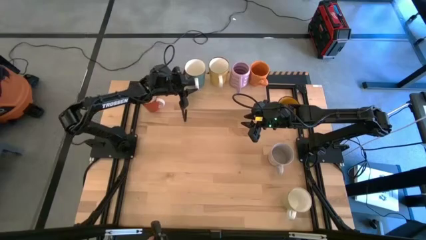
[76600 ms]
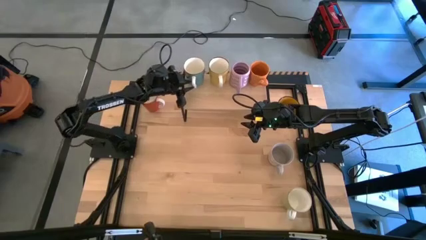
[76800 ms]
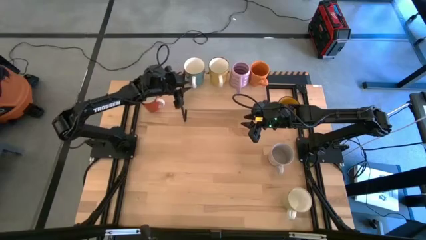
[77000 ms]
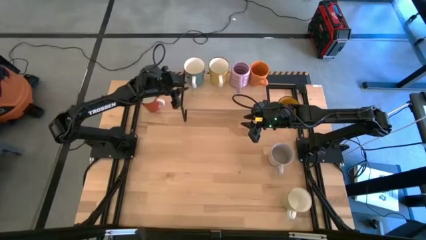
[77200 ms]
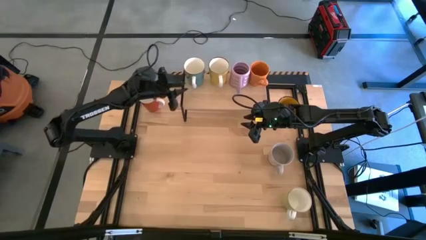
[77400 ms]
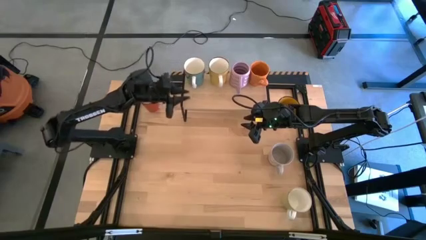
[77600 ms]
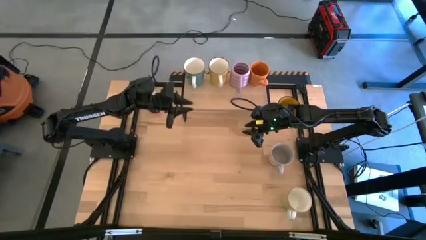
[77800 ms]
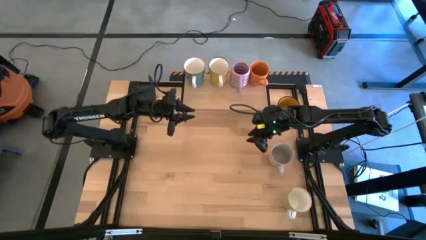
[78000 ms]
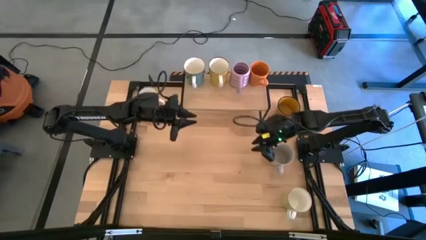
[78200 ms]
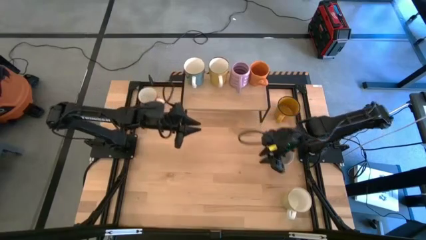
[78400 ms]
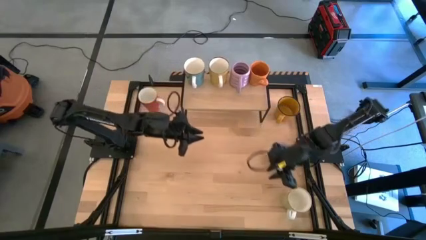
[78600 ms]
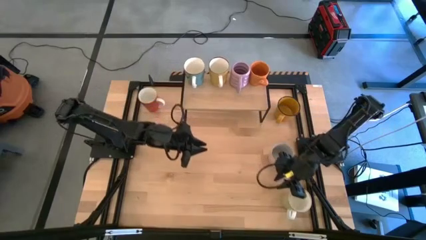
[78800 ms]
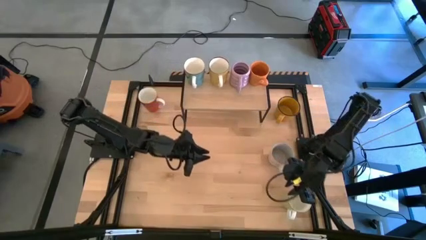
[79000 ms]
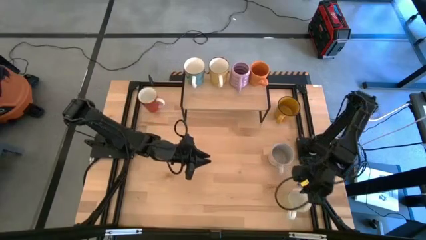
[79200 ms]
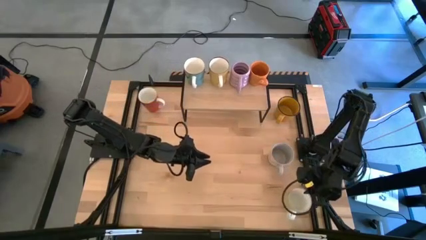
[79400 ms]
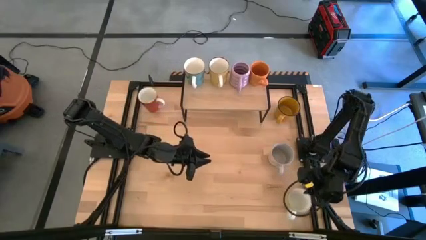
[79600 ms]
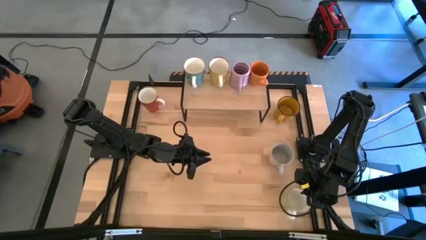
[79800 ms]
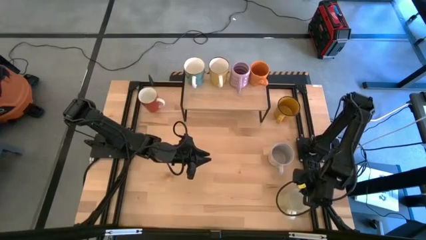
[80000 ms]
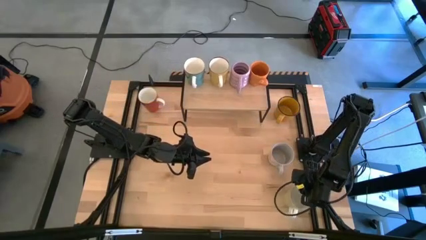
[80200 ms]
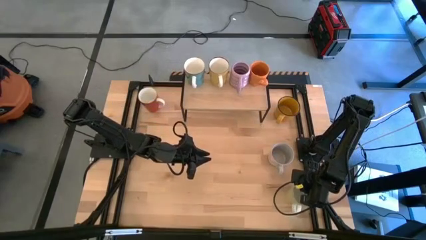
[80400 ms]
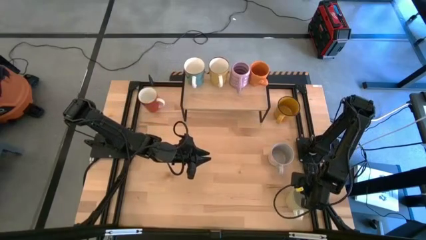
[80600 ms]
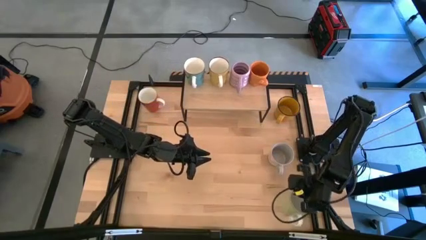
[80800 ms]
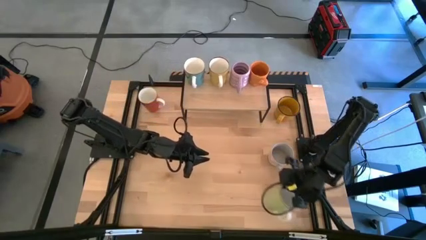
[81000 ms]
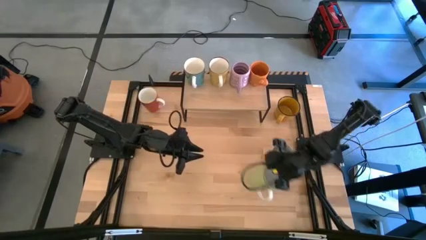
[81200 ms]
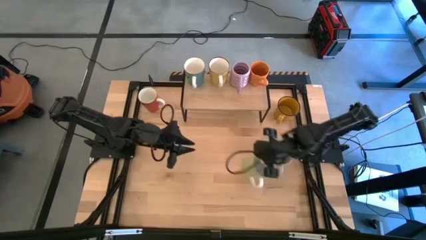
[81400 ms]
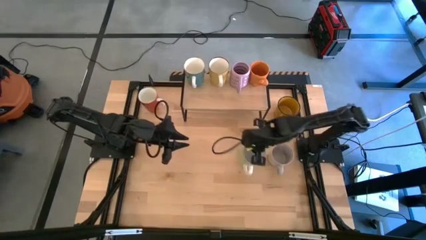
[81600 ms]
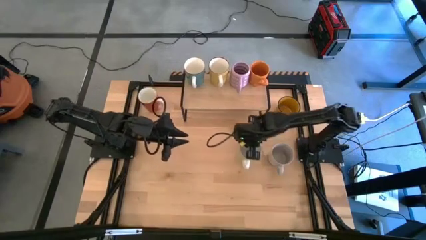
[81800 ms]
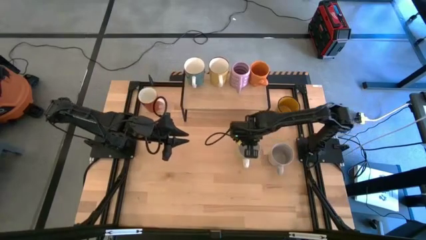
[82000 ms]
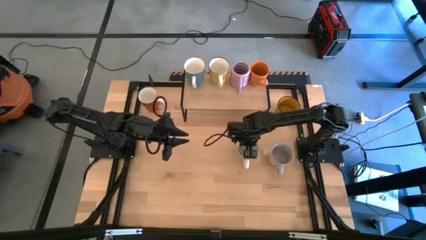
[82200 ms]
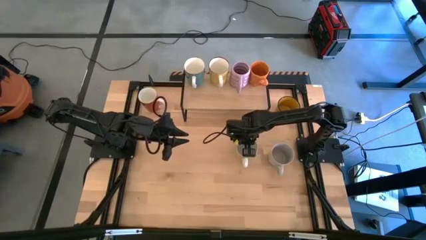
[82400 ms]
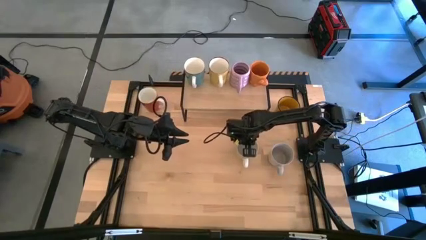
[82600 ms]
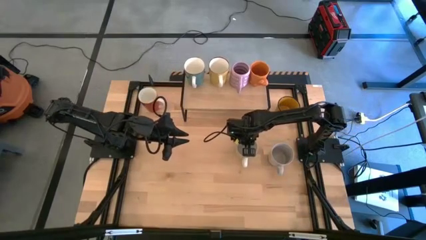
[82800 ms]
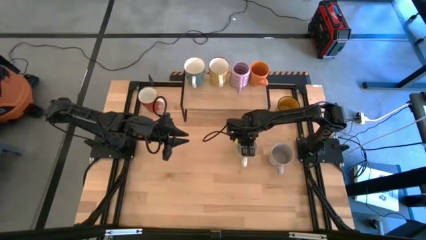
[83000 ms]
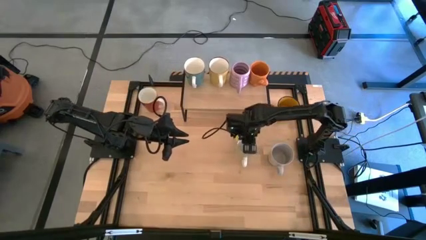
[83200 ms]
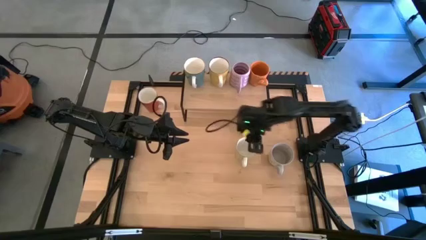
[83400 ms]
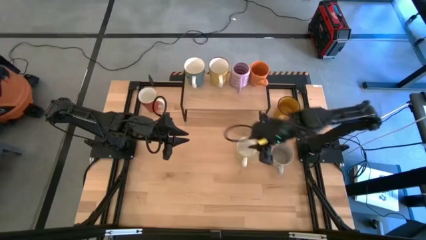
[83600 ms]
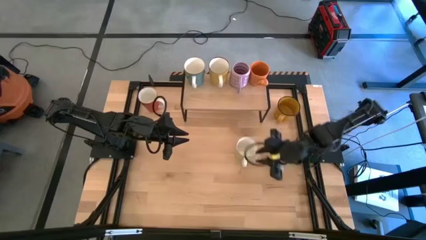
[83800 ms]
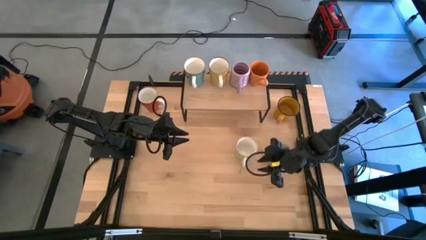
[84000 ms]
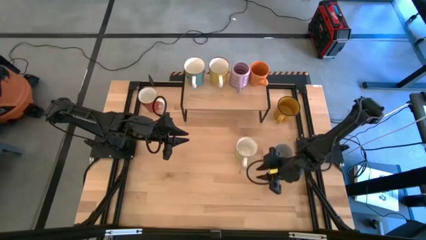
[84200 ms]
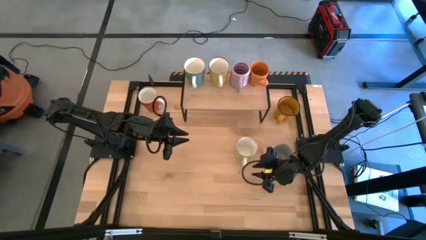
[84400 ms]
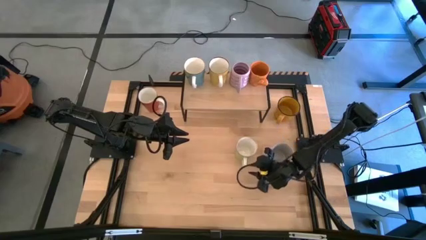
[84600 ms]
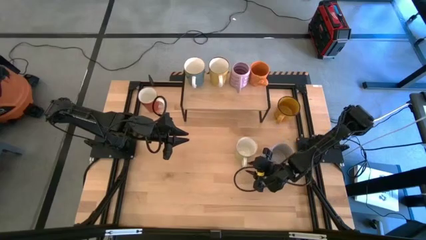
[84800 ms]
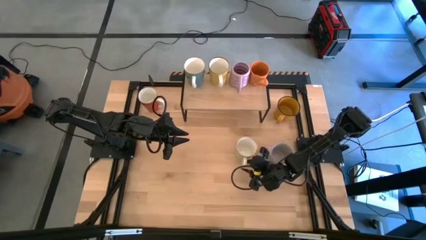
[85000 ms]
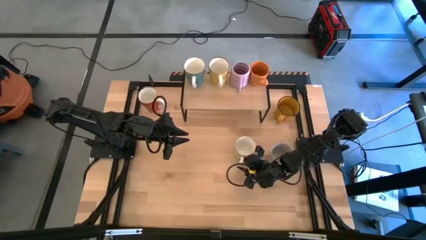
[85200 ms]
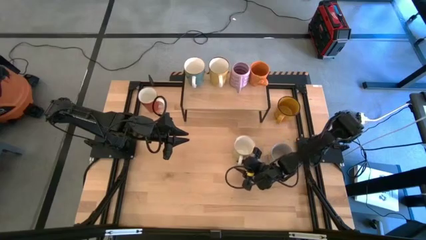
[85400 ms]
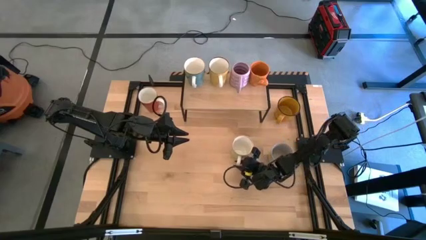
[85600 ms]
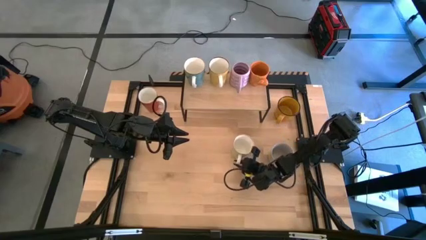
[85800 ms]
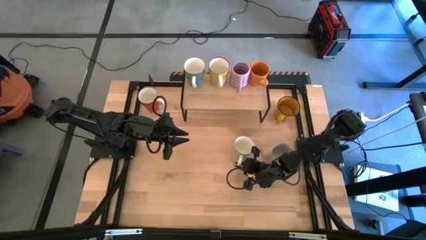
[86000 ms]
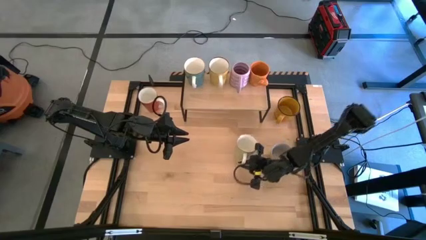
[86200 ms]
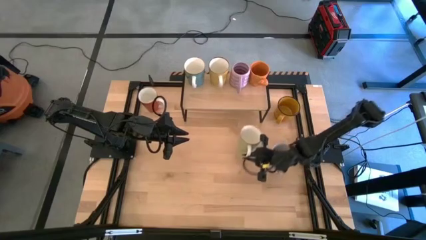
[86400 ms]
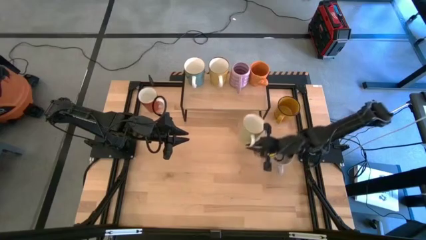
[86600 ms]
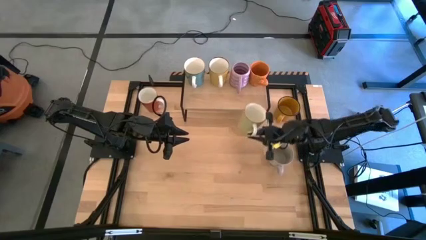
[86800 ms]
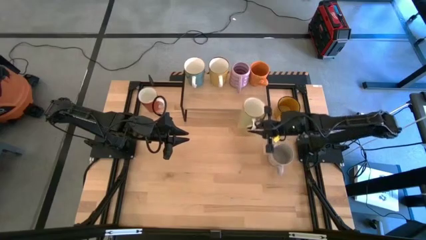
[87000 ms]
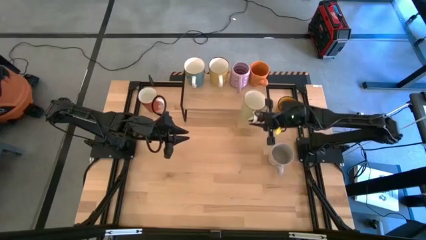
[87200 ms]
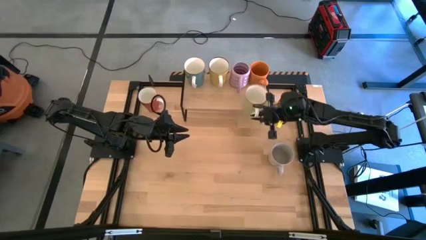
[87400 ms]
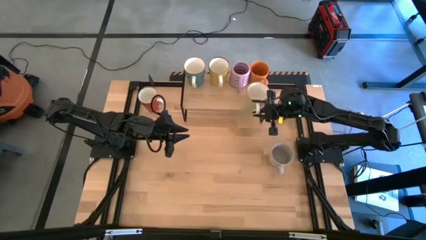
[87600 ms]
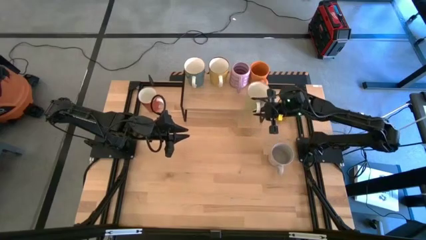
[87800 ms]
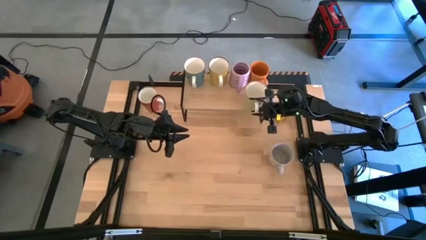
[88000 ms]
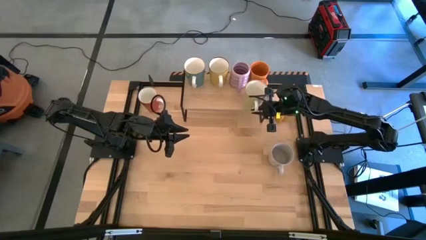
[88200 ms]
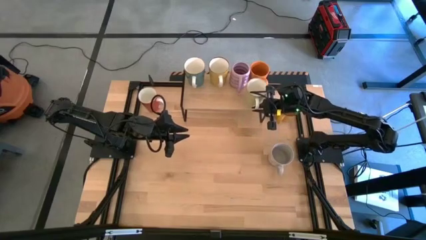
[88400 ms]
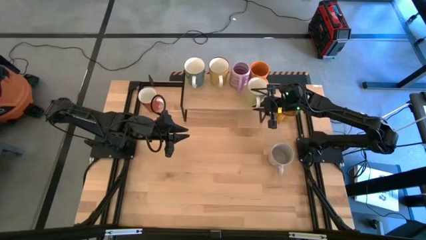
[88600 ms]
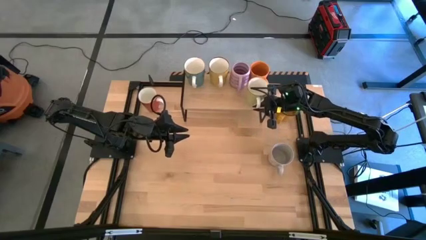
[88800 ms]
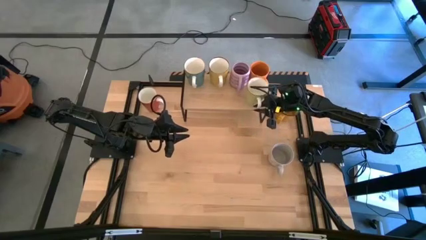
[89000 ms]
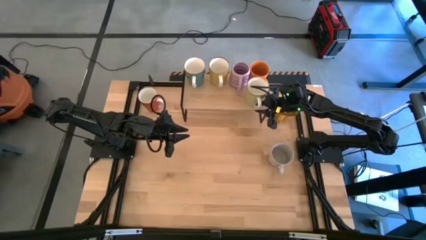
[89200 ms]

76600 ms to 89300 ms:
Task: Place coffee mugs
Put the green mug on the shelf

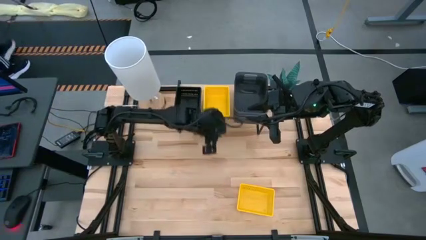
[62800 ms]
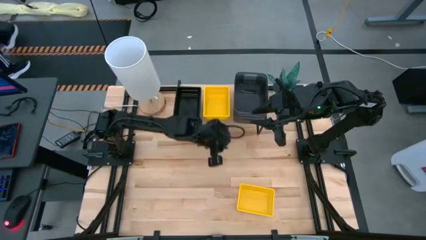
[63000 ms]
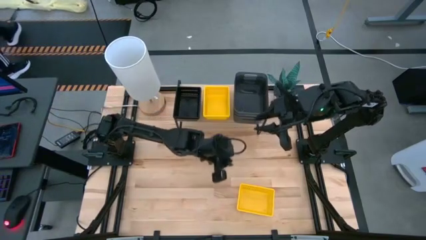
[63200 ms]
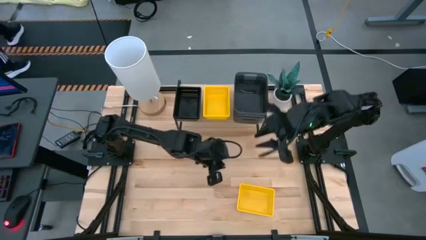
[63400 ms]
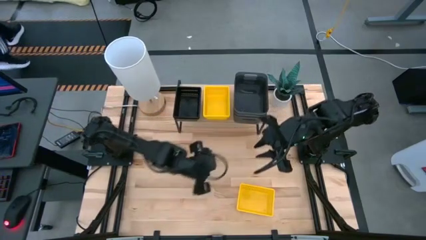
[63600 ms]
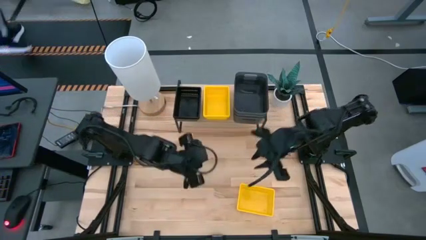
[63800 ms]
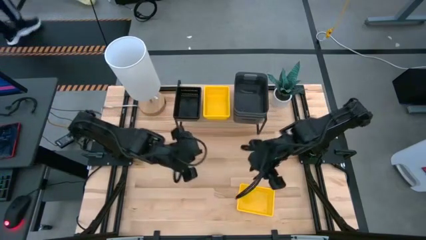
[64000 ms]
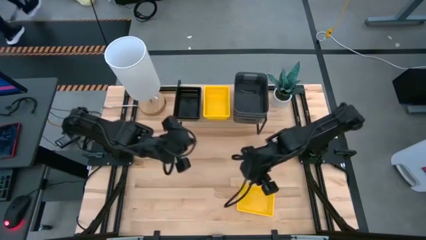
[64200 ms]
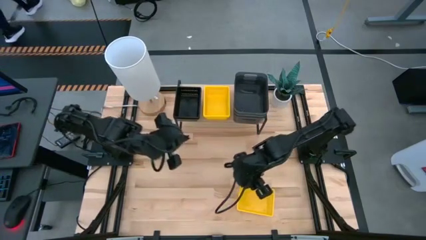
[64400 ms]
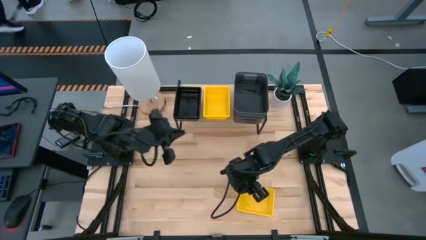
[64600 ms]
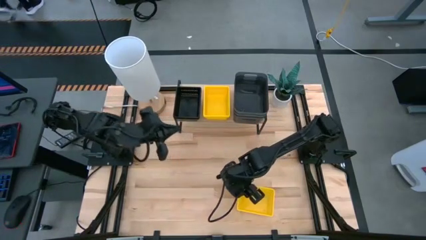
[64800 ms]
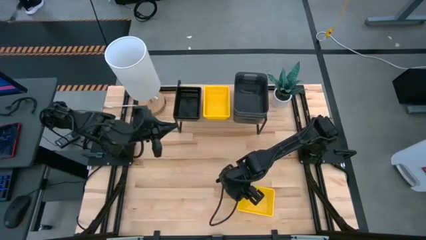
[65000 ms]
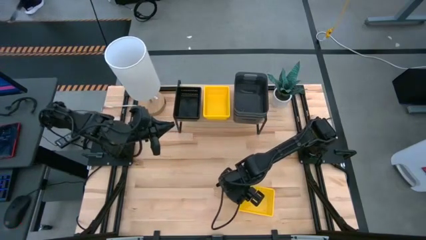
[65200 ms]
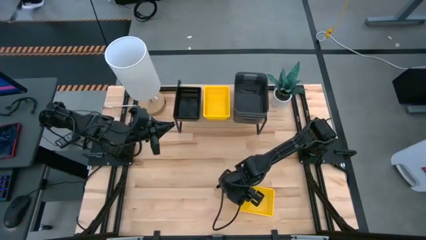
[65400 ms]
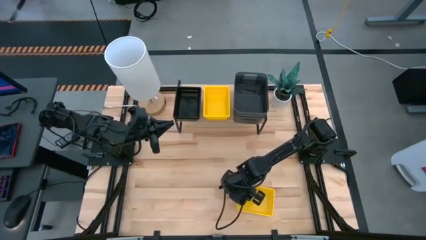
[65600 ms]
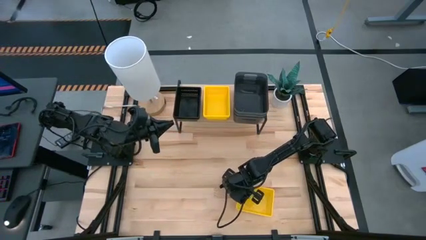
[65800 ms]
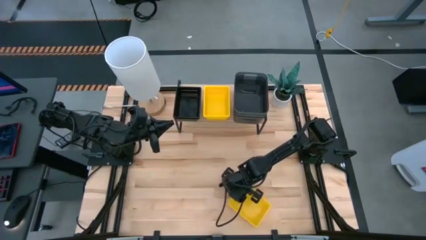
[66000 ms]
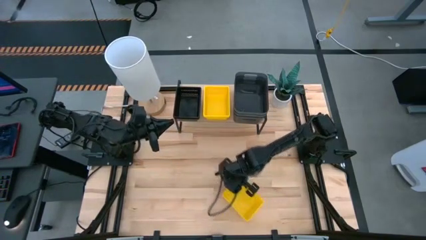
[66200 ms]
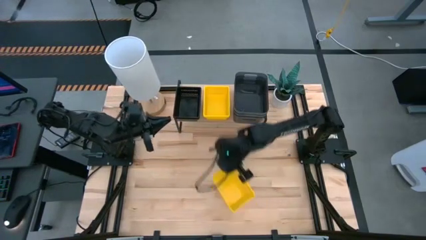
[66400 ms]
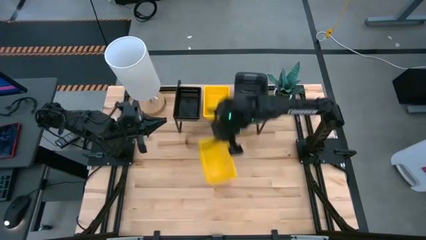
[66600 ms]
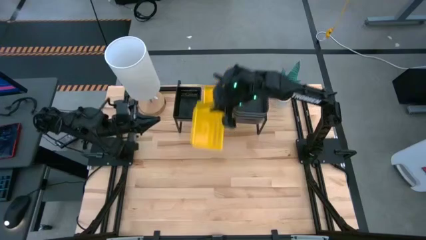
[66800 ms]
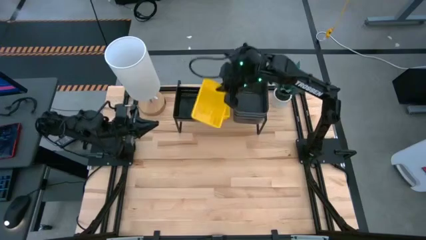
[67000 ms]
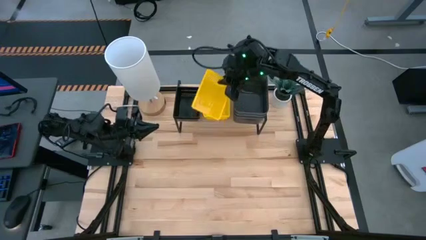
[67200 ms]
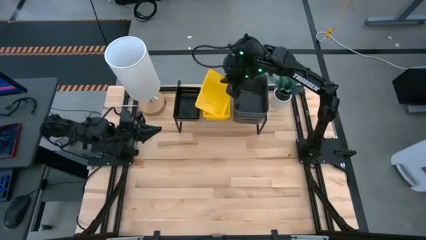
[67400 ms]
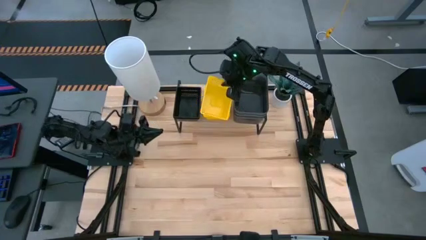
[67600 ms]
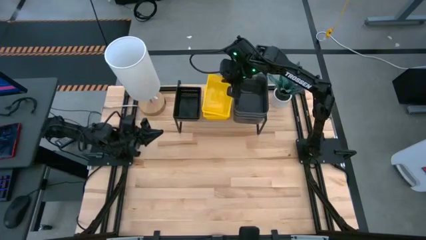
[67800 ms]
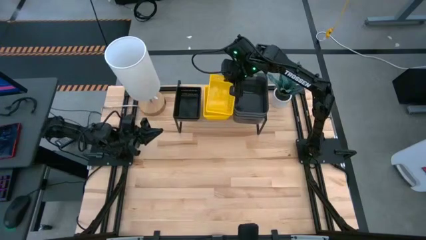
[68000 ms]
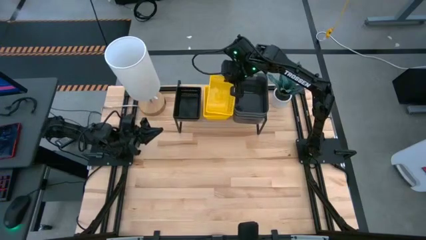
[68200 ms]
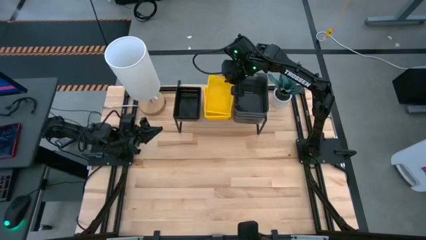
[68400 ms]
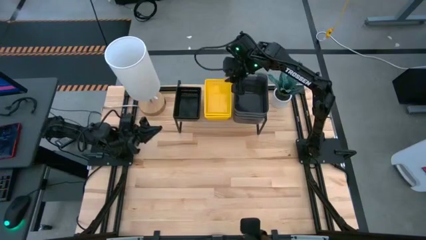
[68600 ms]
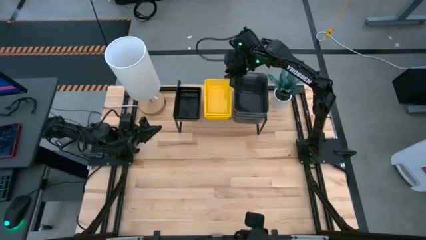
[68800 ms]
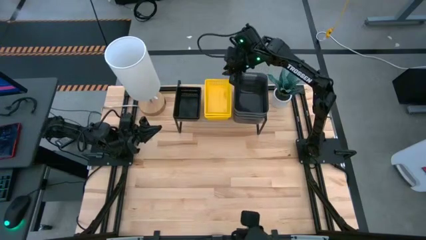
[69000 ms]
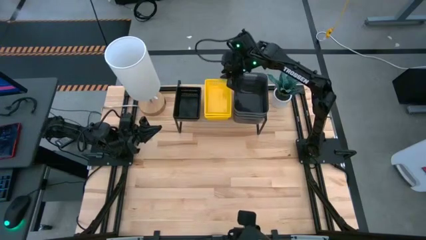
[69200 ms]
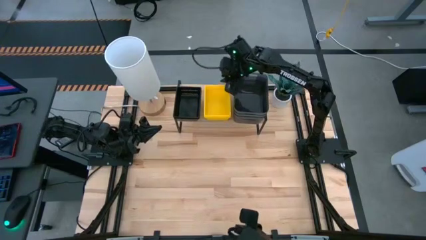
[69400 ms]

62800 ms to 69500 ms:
Task: Stack baskets on shelf by color
Stack the yellow basket on top of the yellow basket on the shelf
